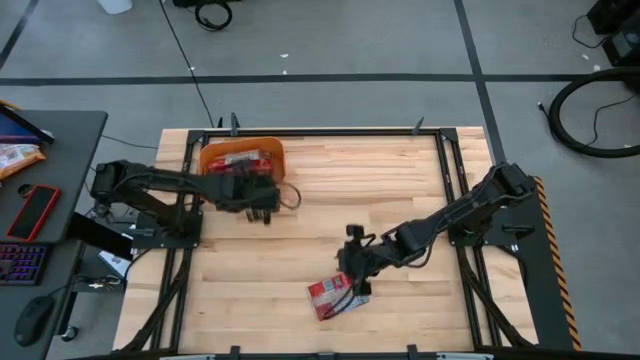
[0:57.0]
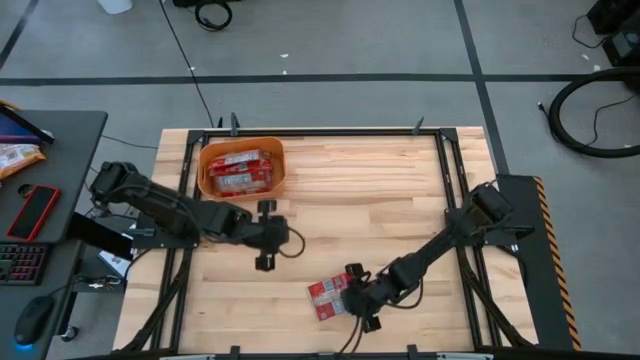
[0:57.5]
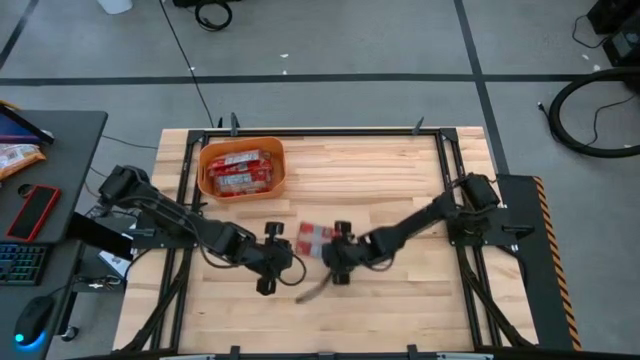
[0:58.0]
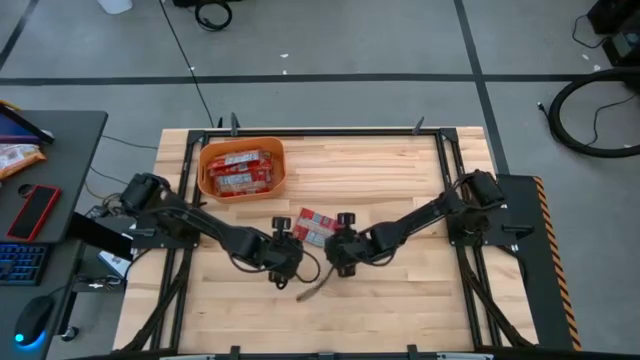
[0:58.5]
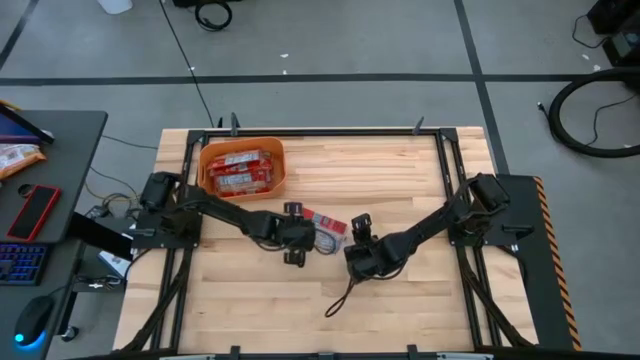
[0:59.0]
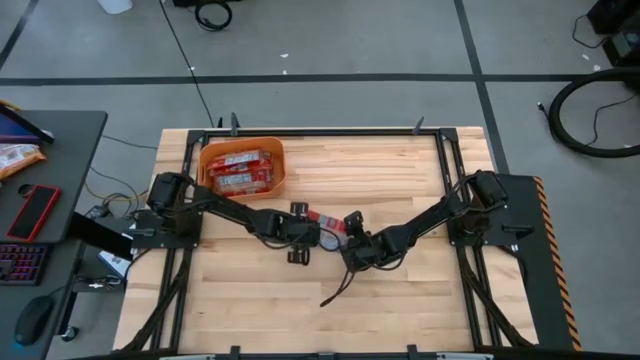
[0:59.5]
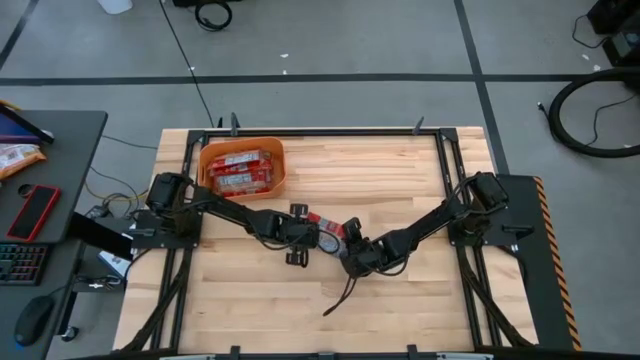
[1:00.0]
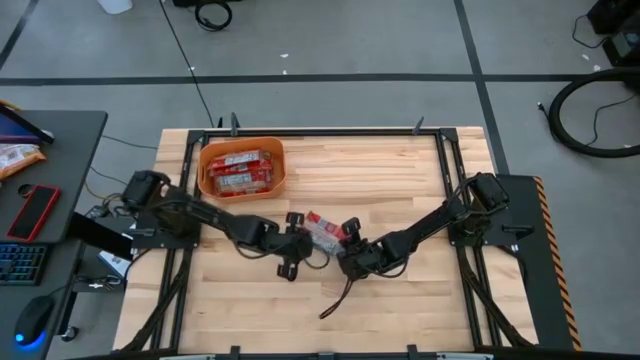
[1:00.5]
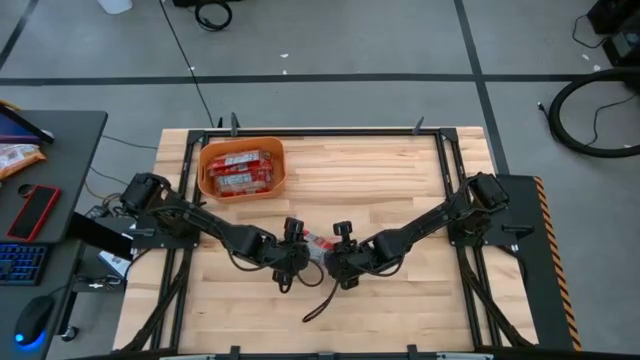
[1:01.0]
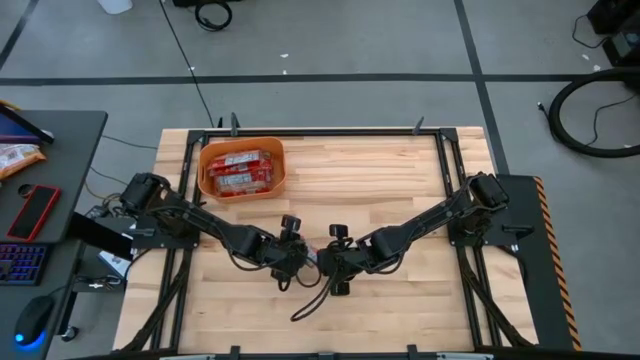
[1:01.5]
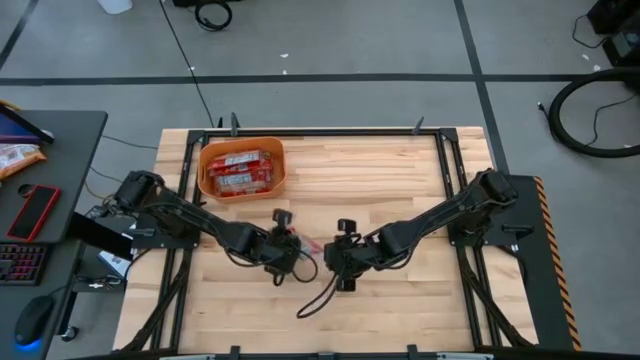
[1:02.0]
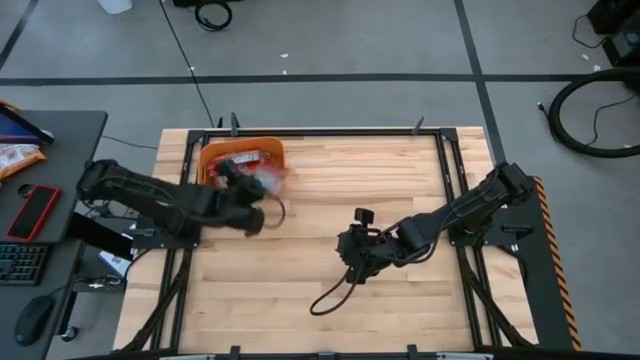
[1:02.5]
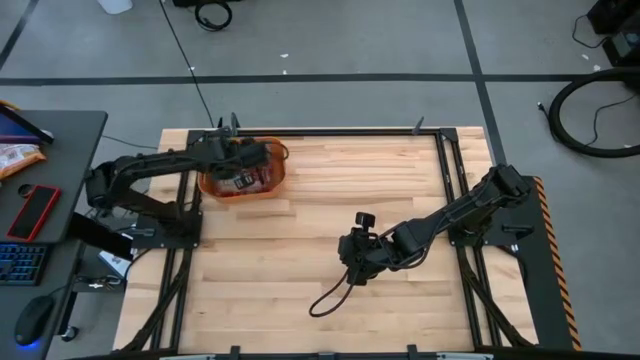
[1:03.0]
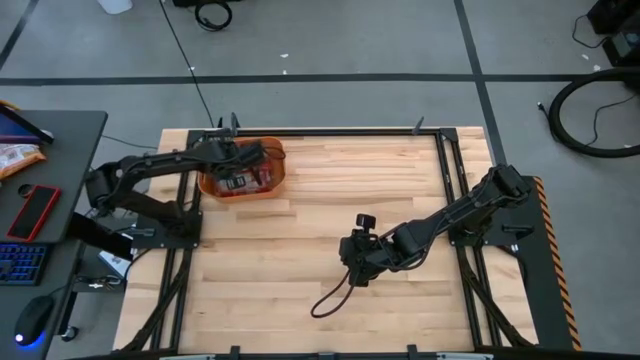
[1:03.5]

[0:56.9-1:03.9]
Task: Sort popcorn bags into baskets
Put the red popcorn bag into the orange bin

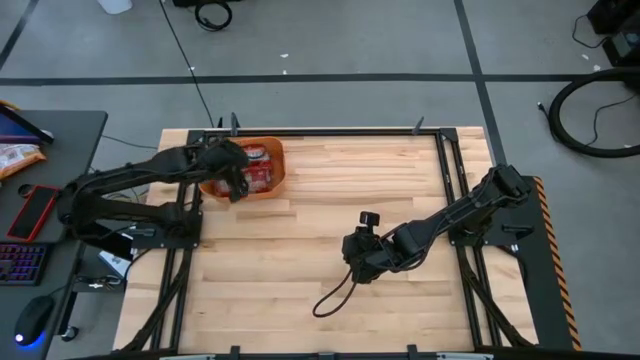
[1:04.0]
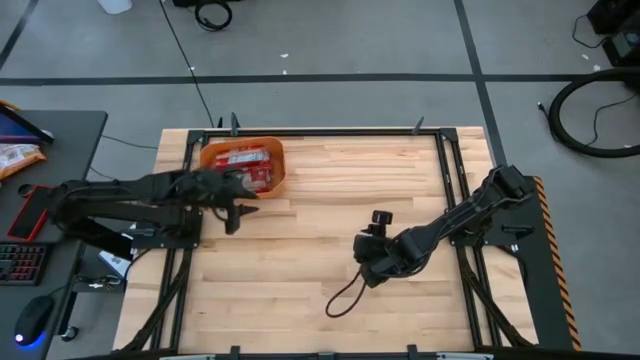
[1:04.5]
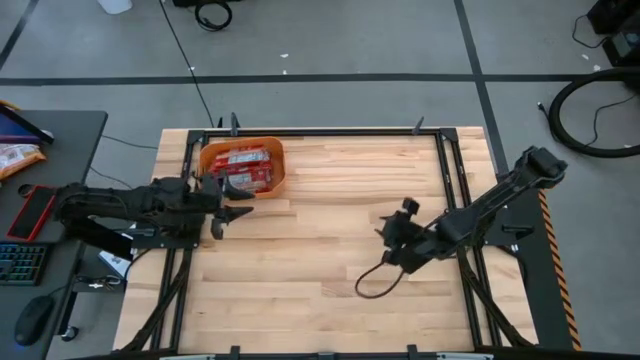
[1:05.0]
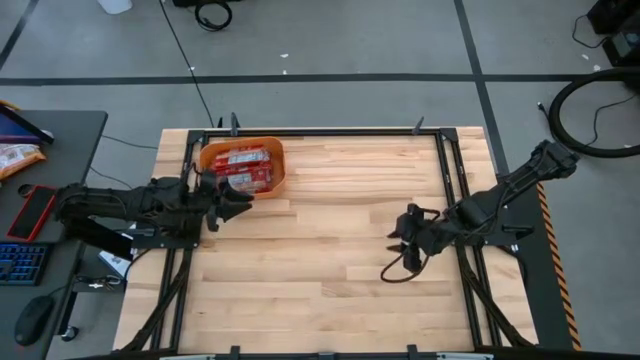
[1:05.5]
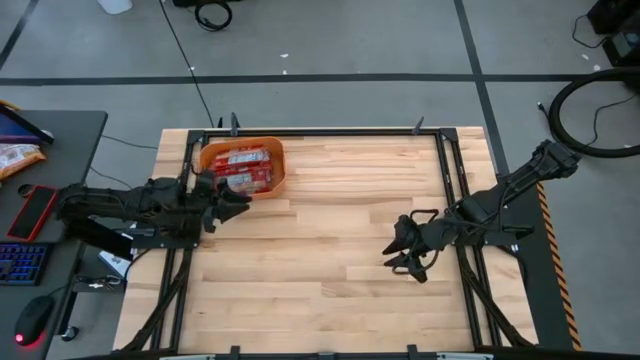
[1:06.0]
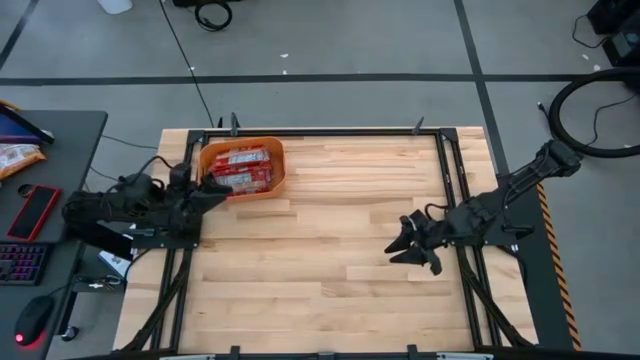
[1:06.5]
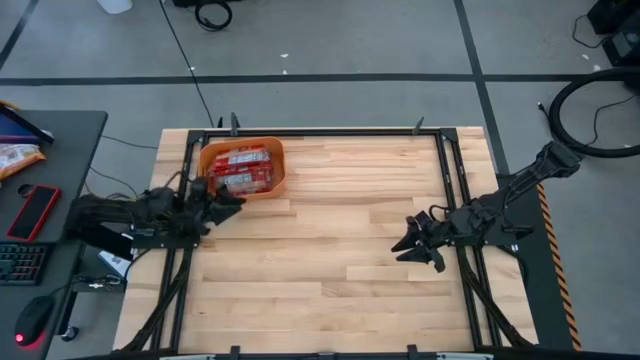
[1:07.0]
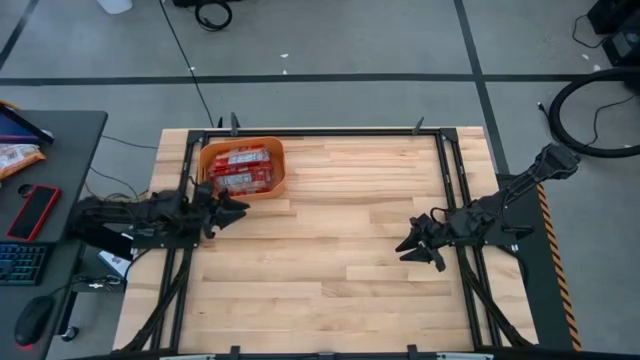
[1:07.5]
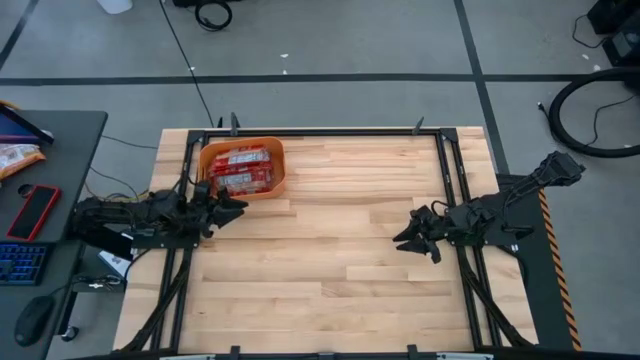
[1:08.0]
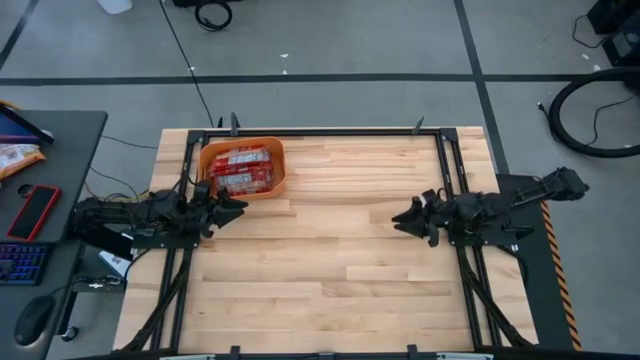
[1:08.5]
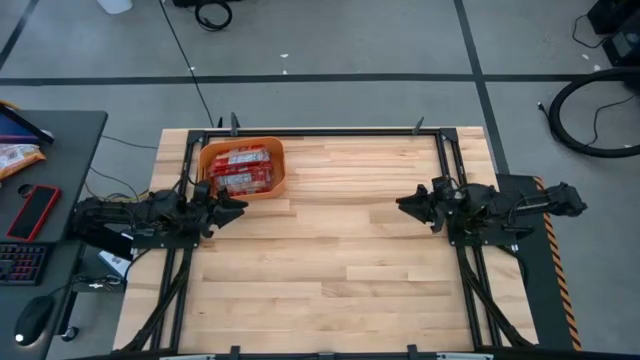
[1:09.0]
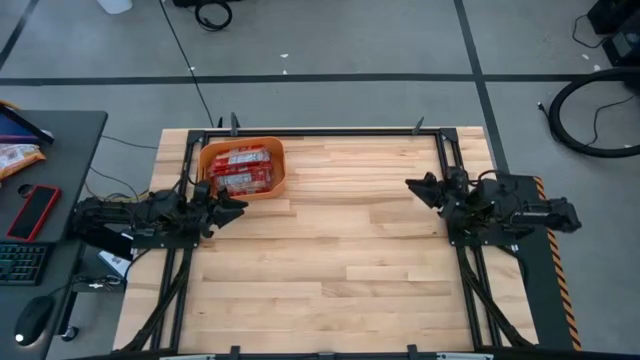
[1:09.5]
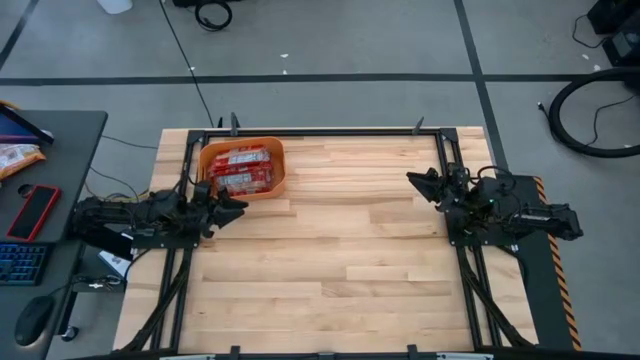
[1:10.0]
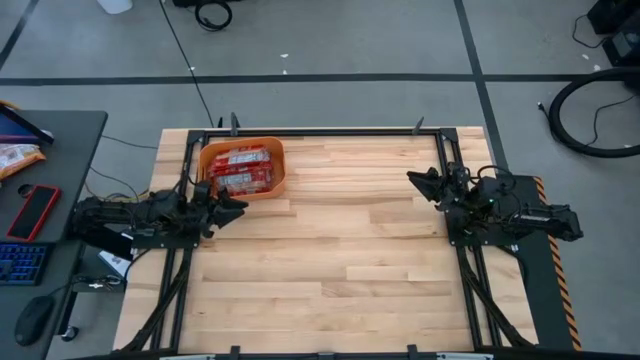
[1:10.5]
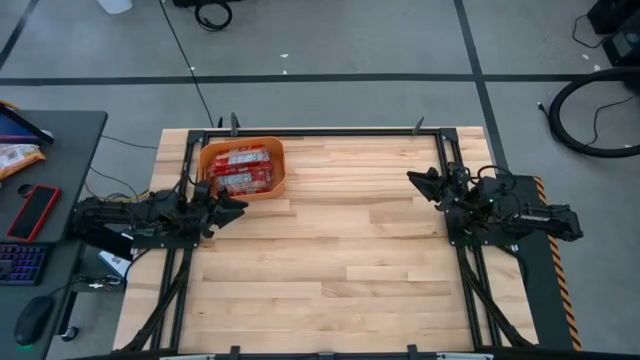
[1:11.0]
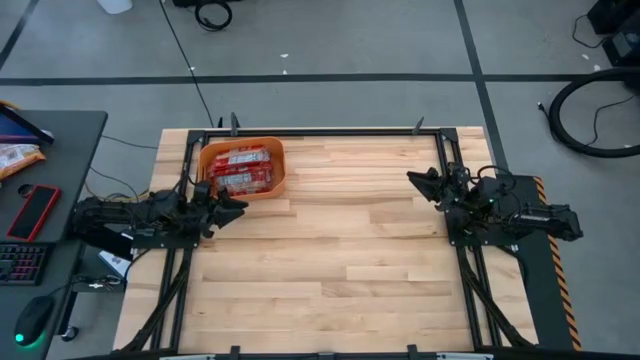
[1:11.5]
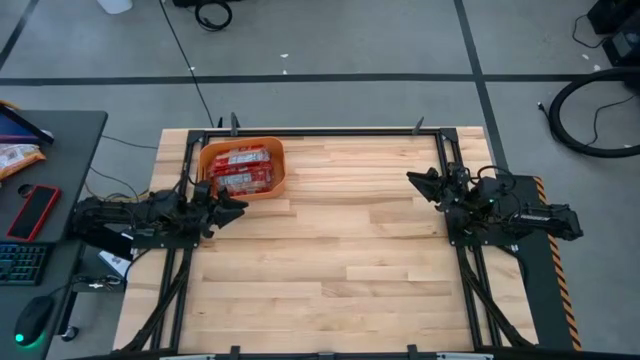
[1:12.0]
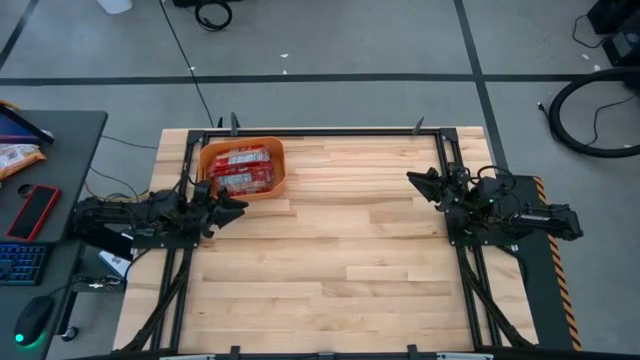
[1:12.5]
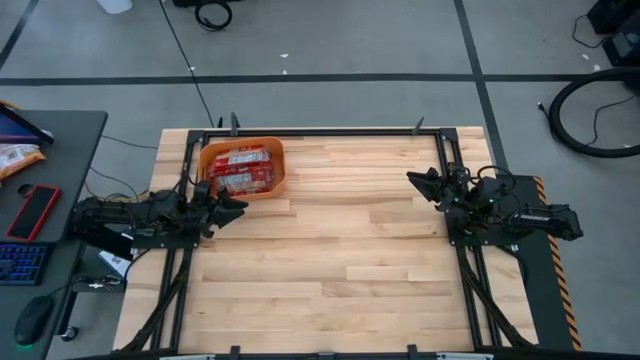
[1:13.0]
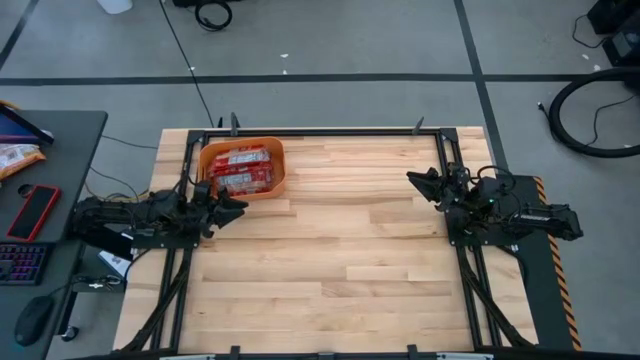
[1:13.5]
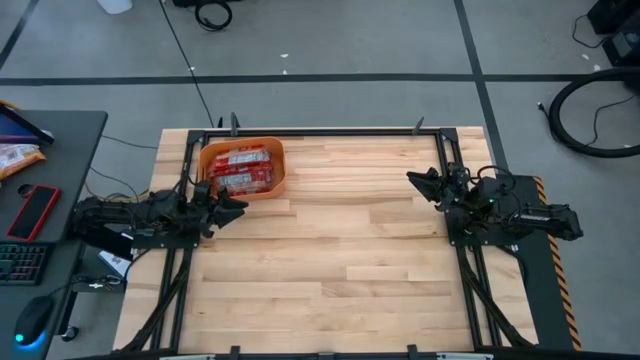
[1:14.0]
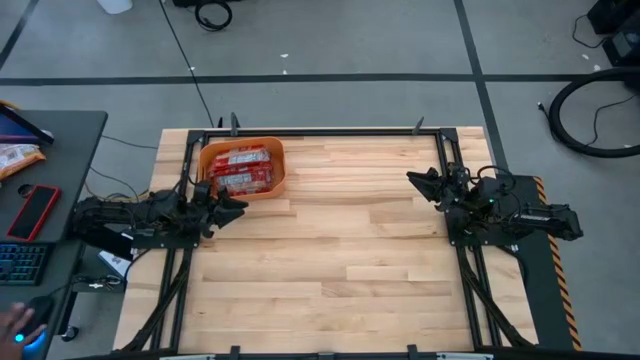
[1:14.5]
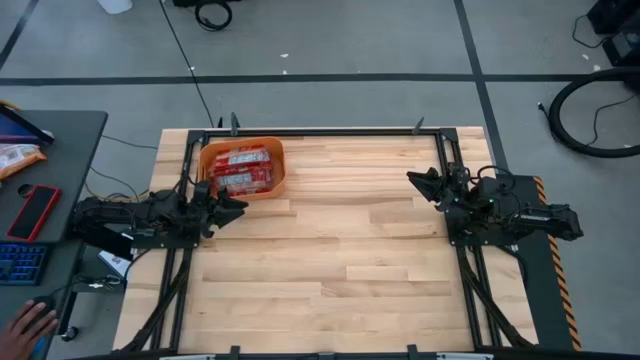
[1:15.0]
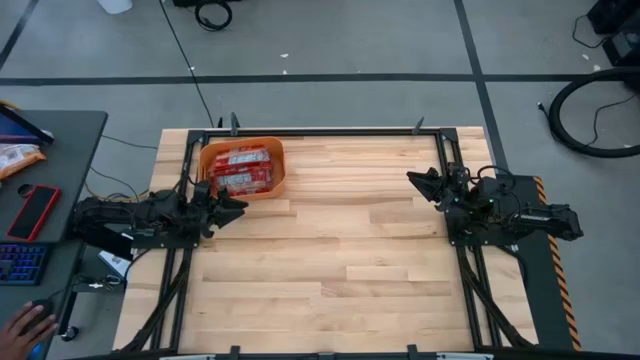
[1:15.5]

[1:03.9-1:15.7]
Return to Home Position

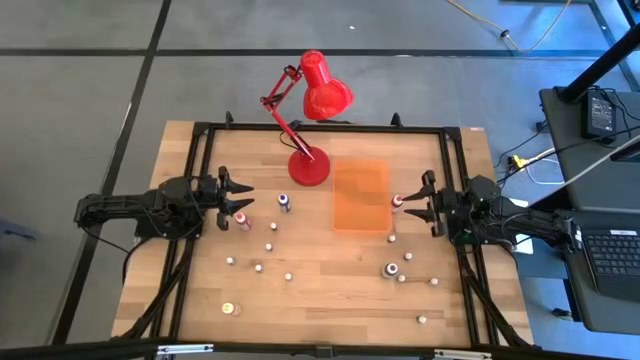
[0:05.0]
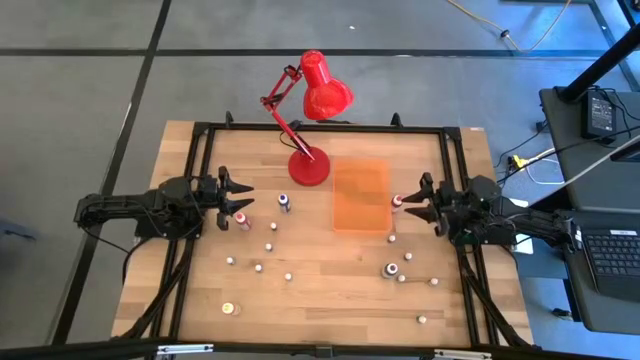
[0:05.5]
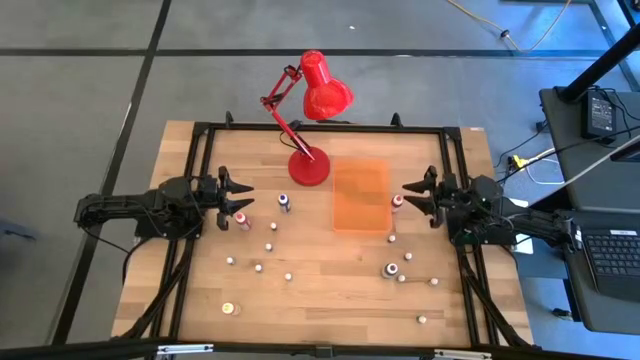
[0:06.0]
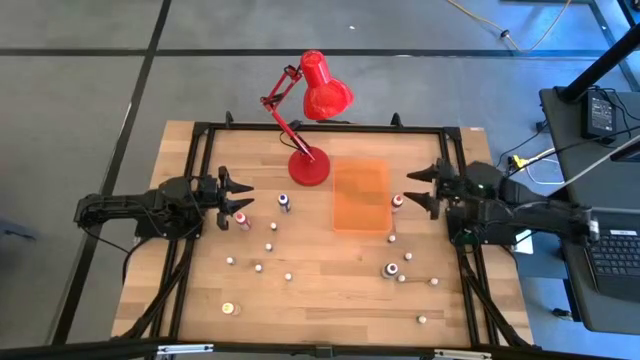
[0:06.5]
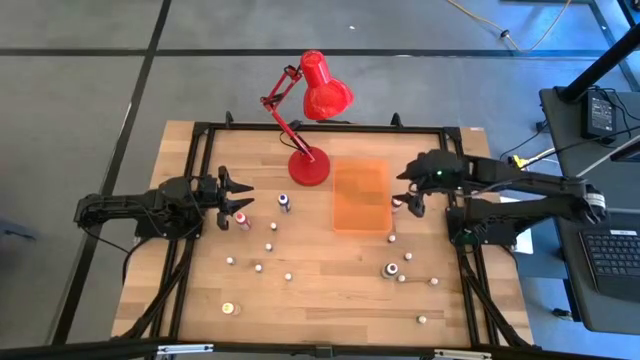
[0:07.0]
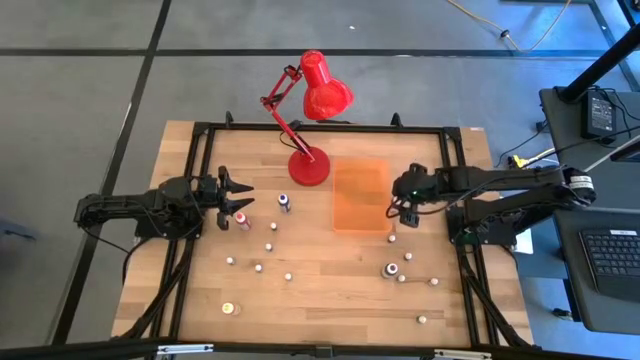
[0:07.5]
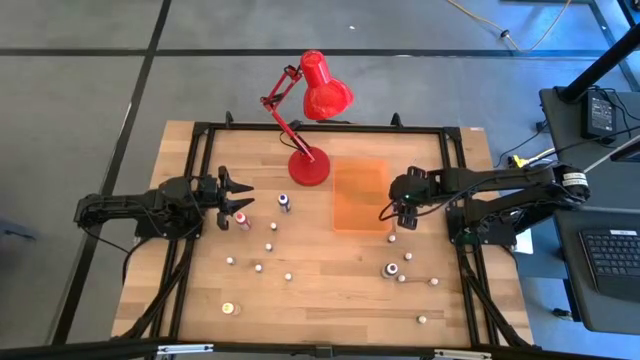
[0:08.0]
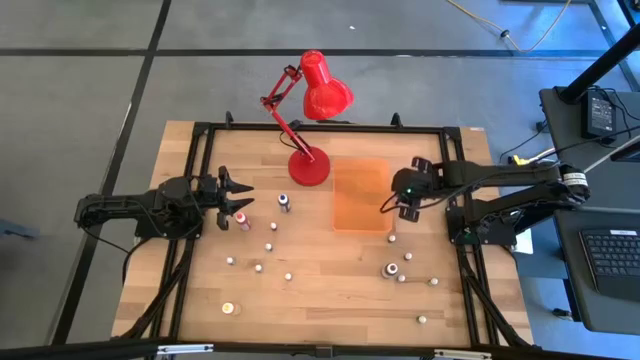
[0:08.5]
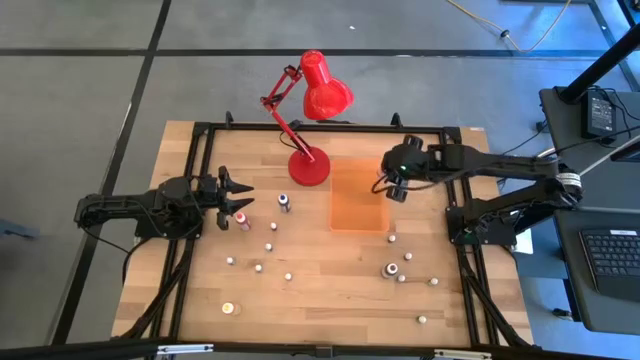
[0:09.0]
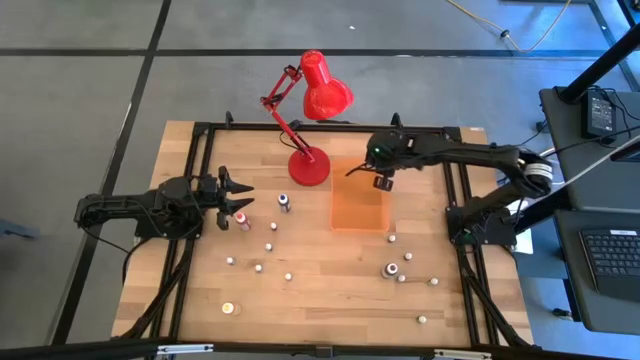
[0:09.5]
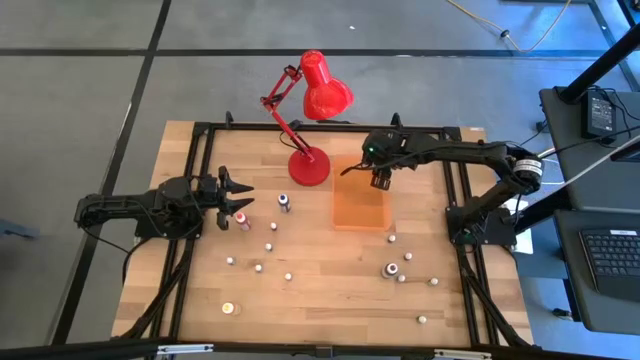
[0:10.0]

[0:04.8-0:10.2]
Task: Pick & Place food coloring
Put the large red food coloring bottle into the orange bin
